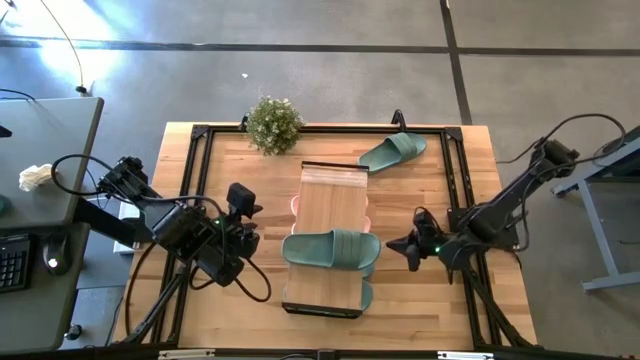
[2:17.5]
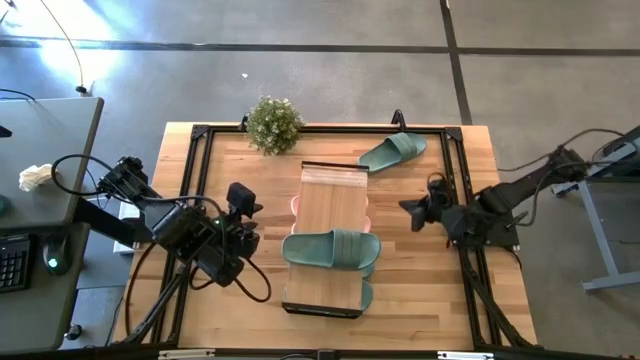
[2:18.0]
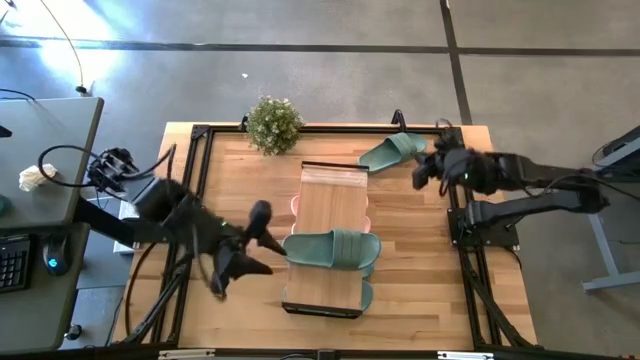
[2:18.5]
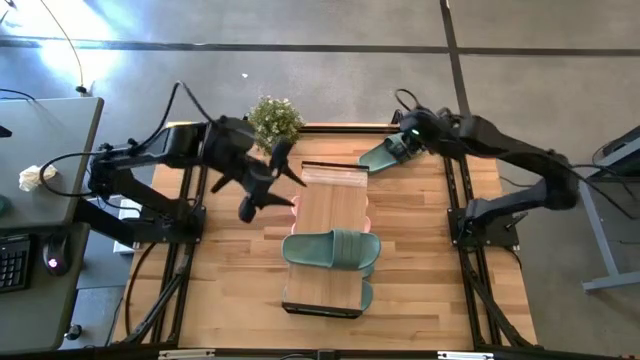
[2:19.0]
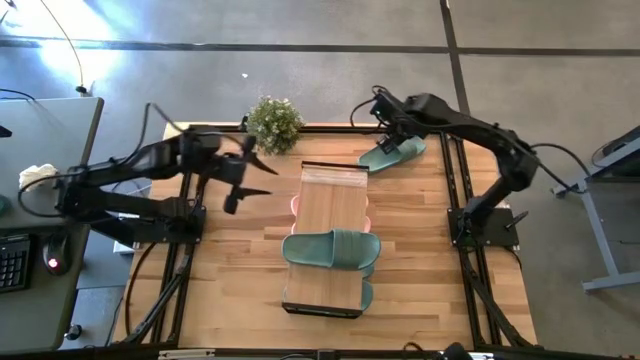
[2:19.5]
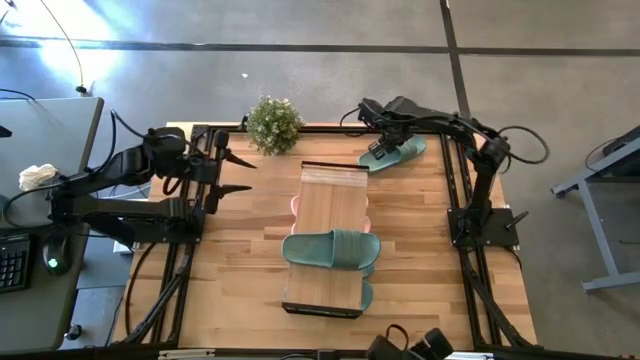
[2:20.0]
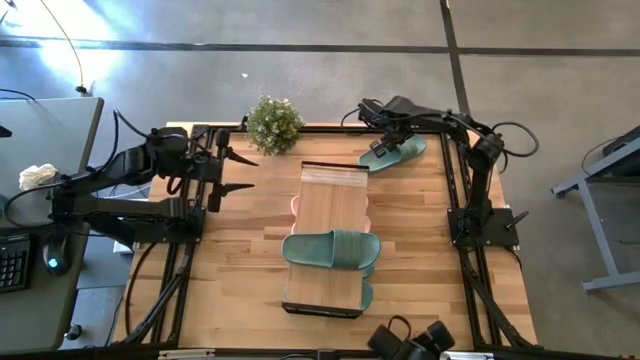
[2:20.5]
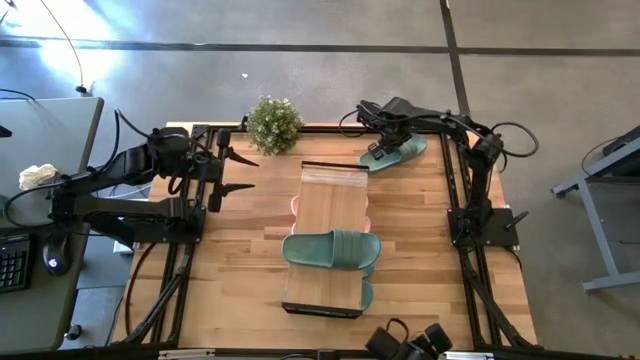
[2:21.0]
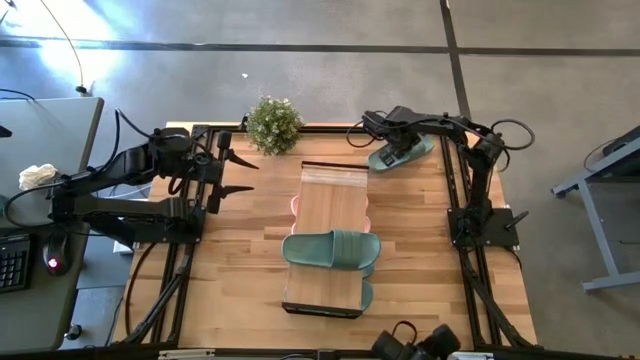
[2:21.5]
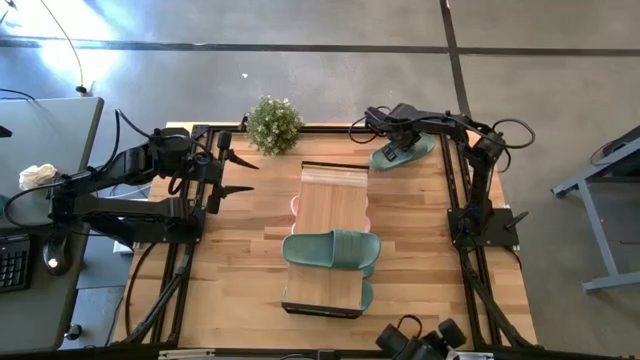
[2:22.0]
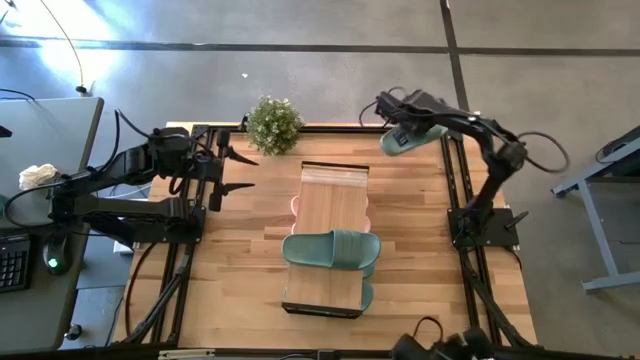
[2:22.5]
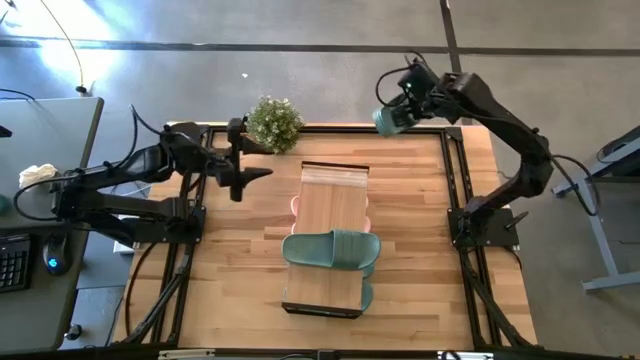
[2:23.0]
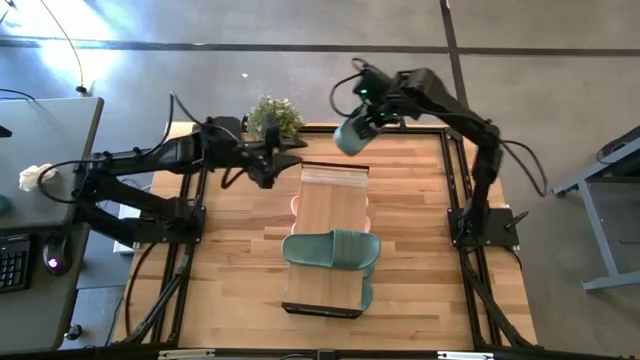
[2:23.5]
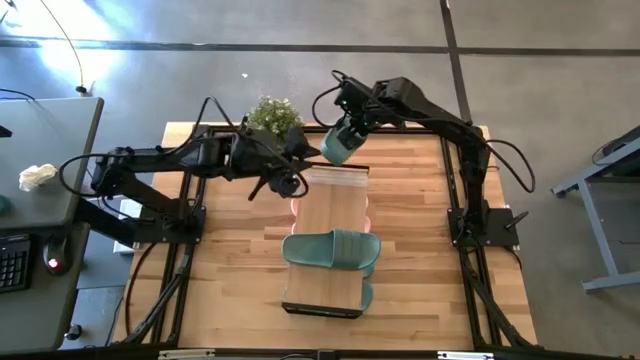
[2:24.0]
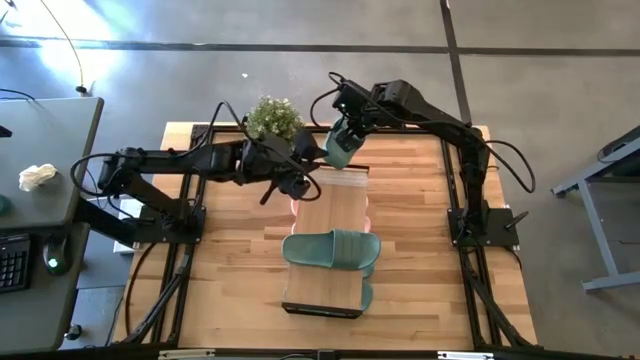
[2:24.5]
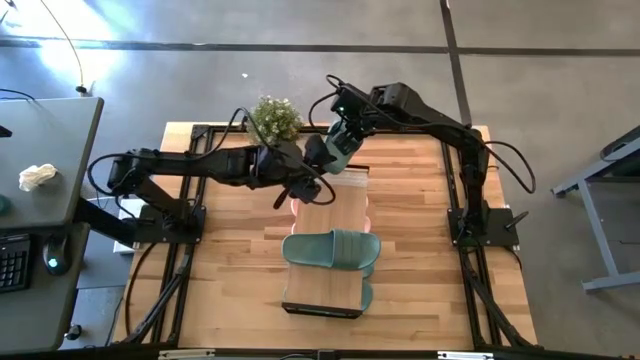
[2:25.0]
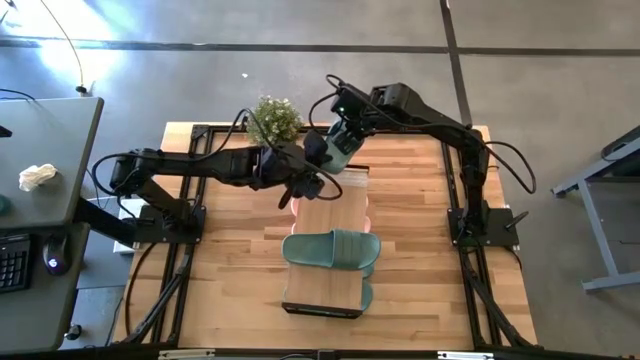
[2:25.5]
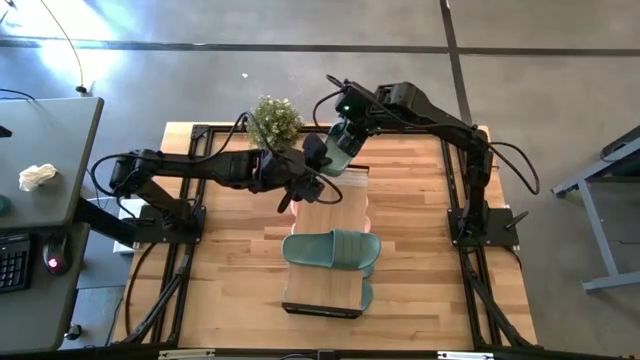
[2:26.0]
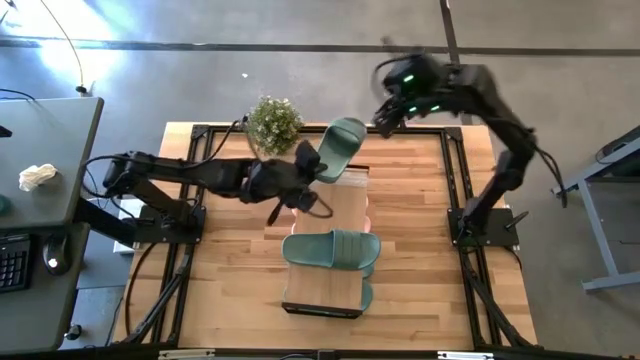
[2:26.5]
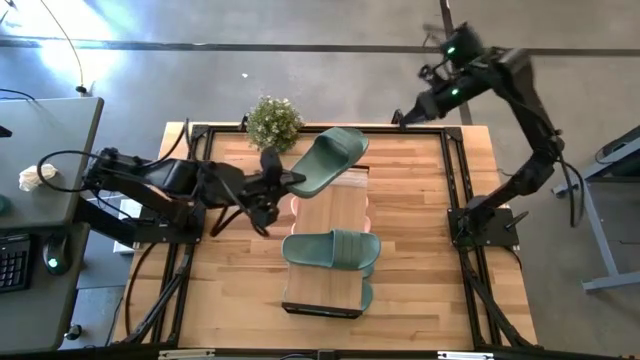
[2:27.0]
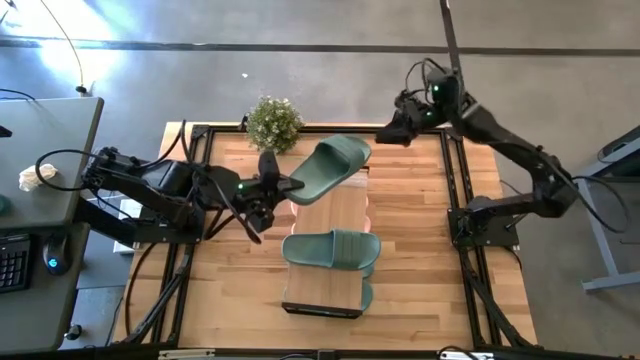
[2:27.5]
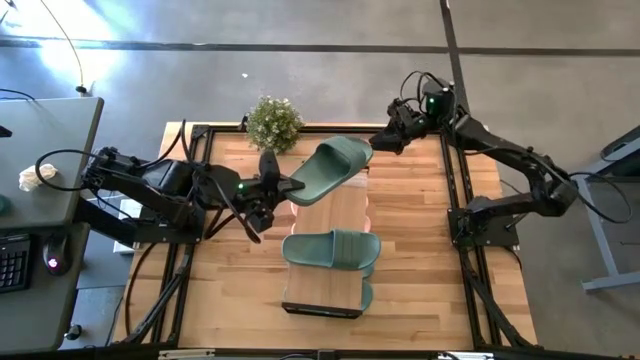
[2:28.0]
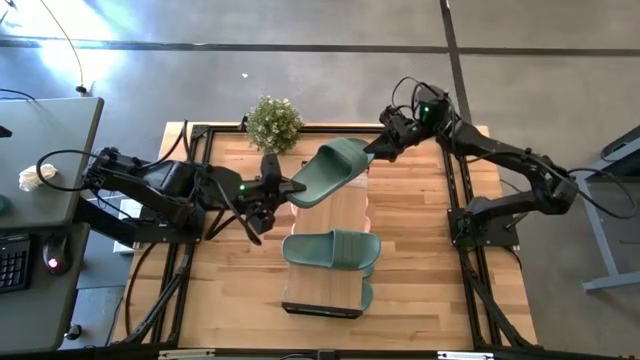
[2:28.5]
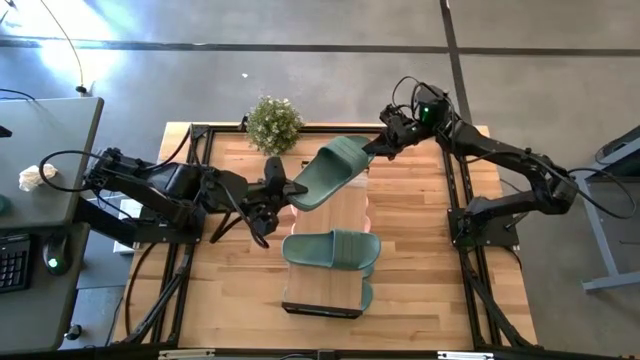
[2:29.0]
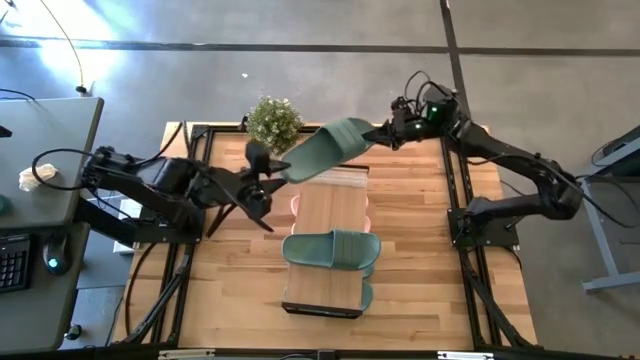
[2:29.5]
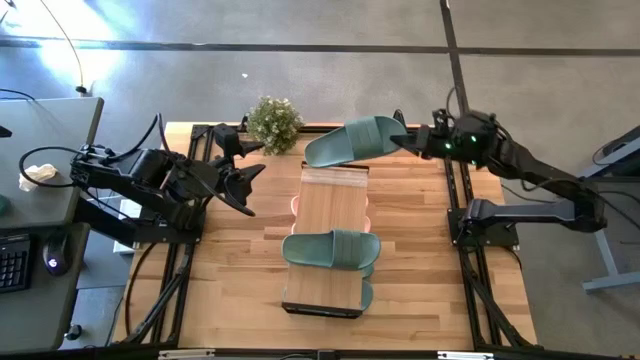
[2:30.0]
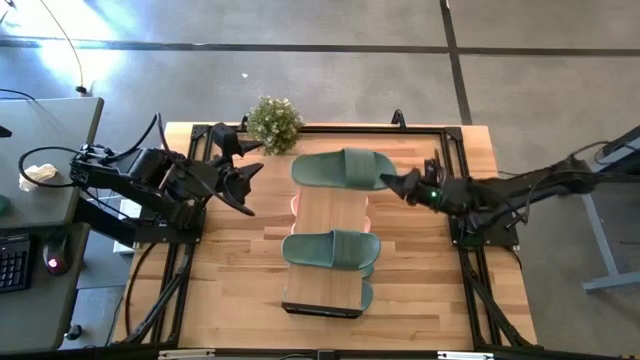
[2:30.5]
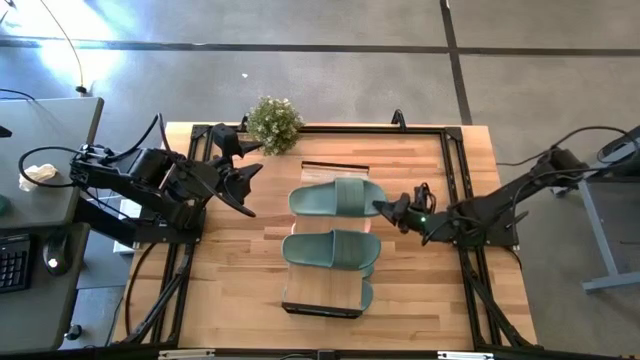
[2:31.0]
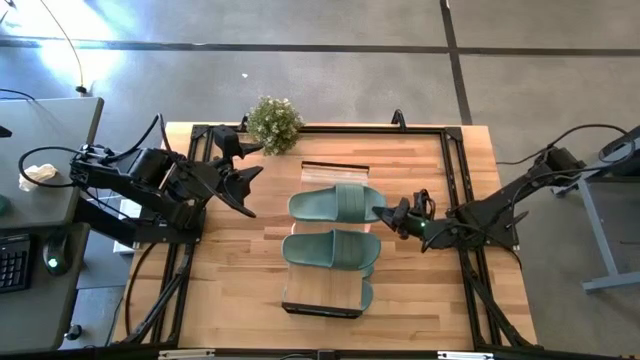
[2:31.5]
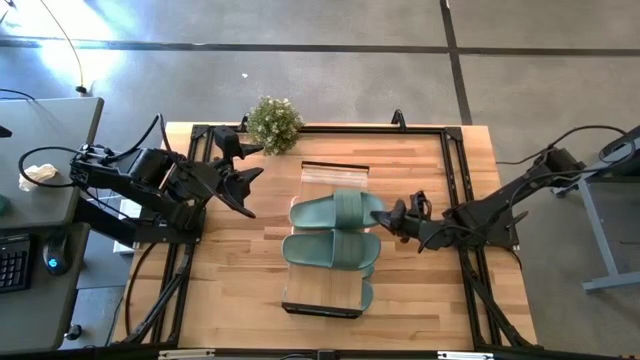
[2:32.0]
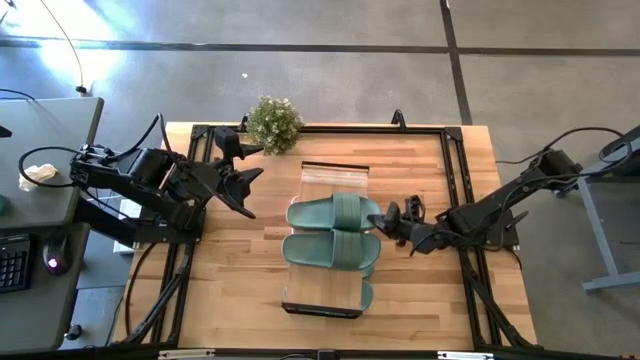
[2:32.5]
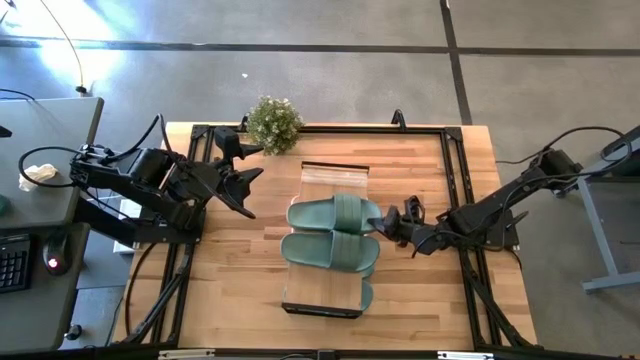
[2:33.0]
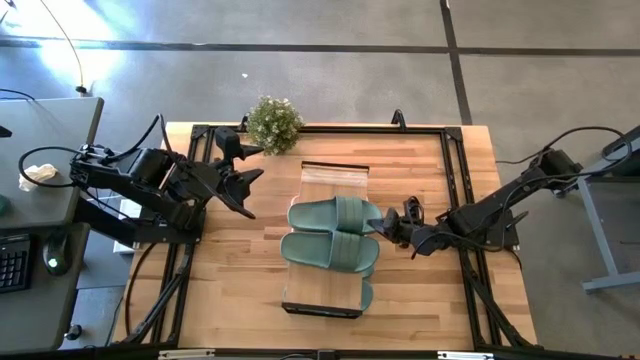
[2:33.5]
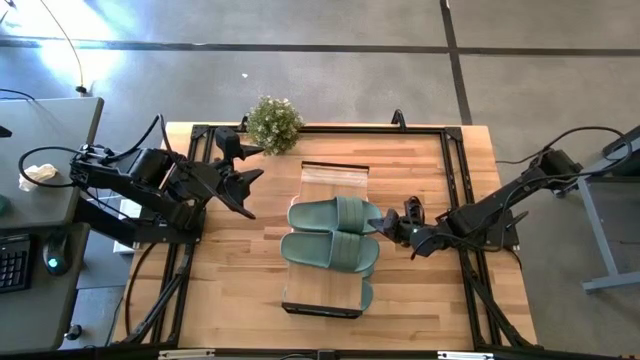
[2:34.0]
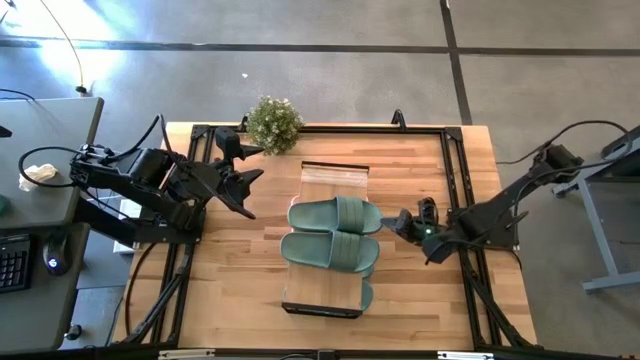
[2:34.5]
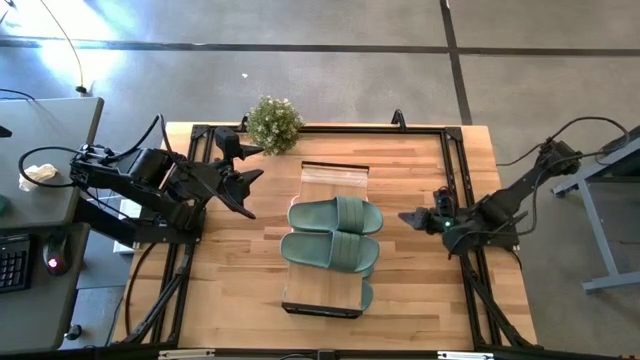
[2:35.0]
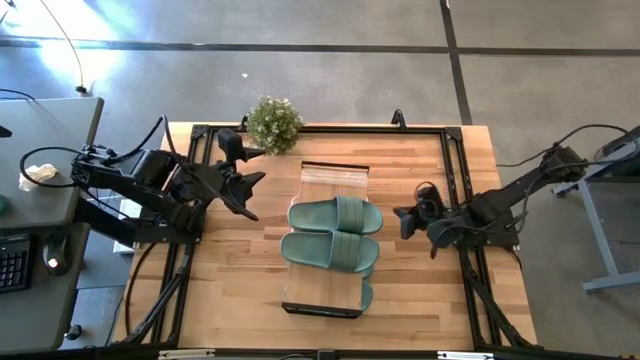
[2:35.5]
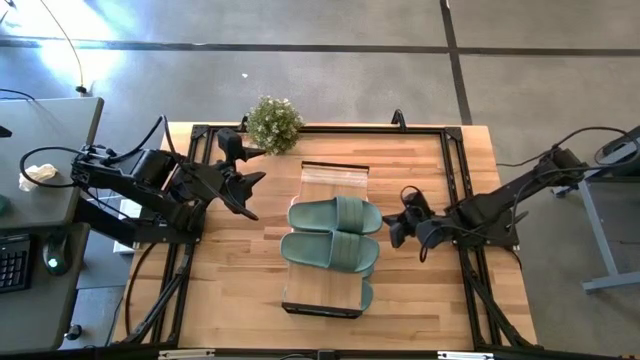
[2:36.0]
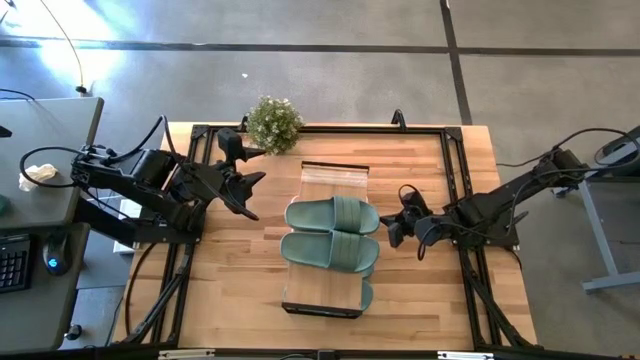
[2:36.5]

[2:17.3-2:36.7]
Task: Pick and place slides into the shelf
Put the green slide on the shelf aligned with the other green slide

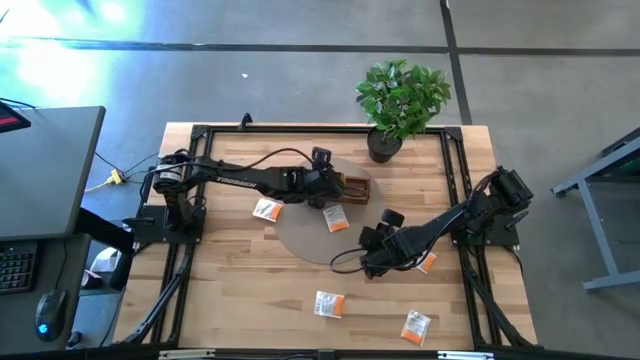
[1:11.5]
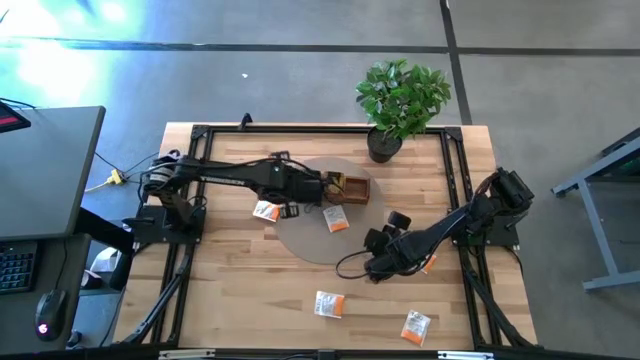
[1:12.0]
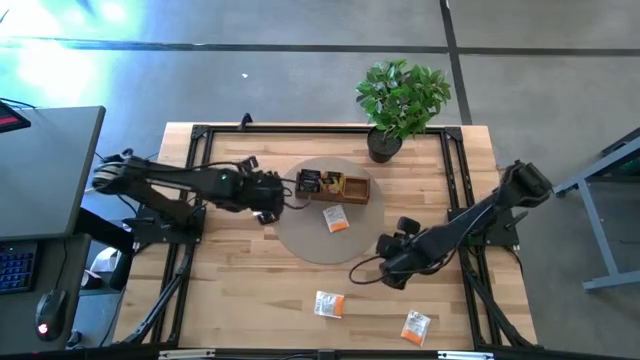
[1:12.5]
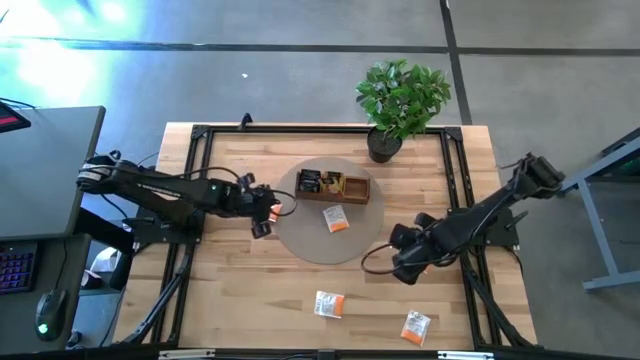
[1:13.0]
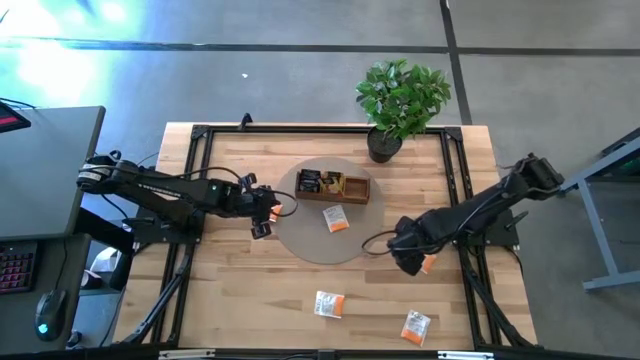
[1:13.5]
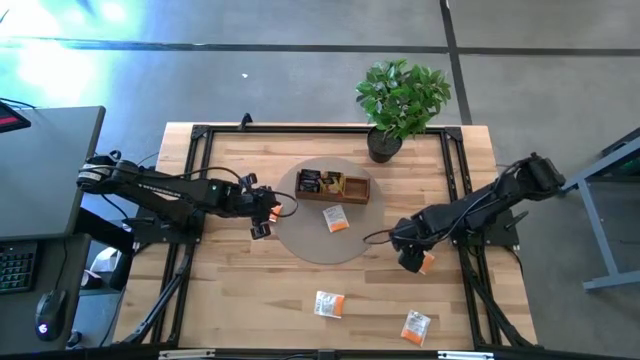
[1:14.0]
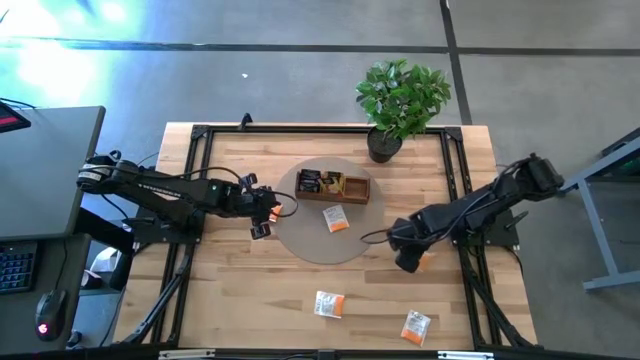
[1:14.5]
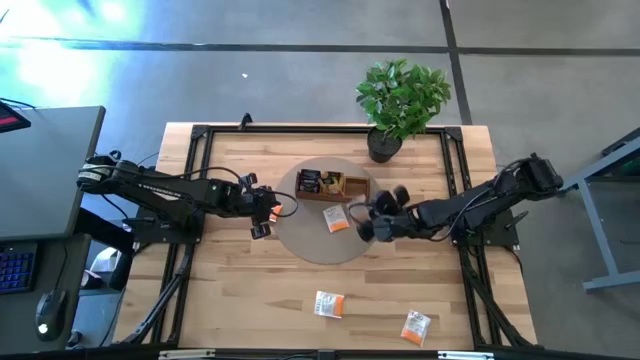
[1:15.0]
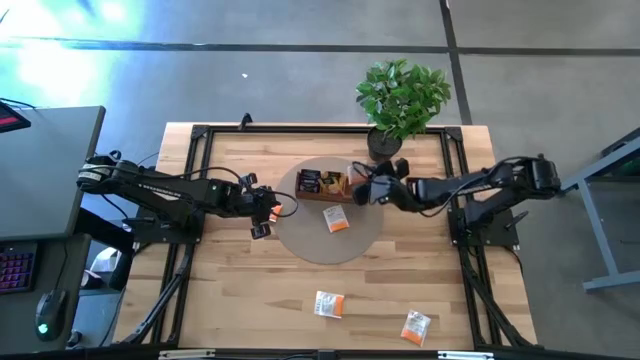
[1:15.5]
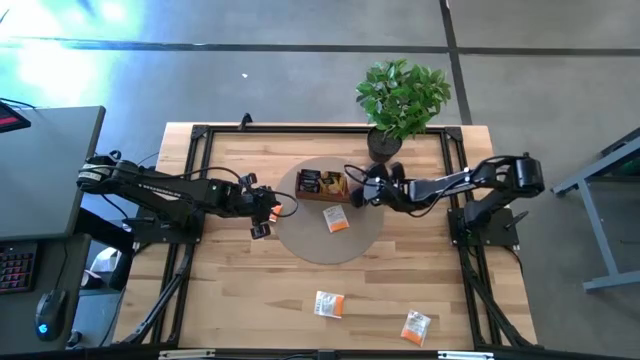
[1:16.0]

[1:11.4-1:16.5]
Task: Pick & Place Tea
Put the white tea bag into the right side area of the wooden organizer
